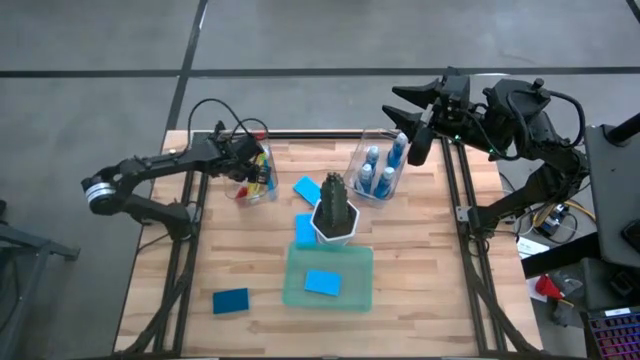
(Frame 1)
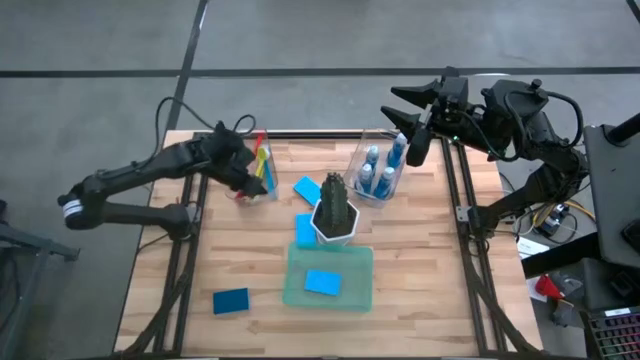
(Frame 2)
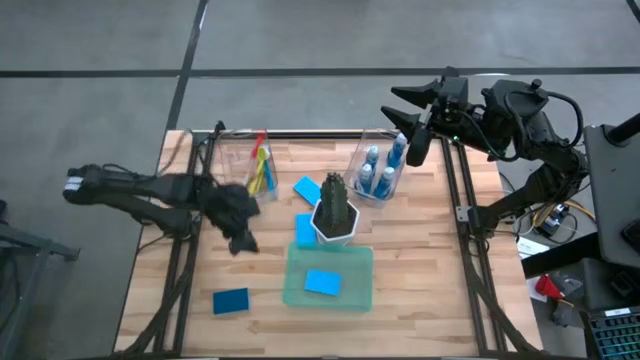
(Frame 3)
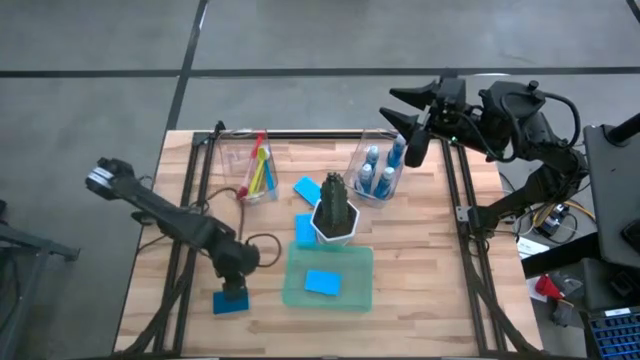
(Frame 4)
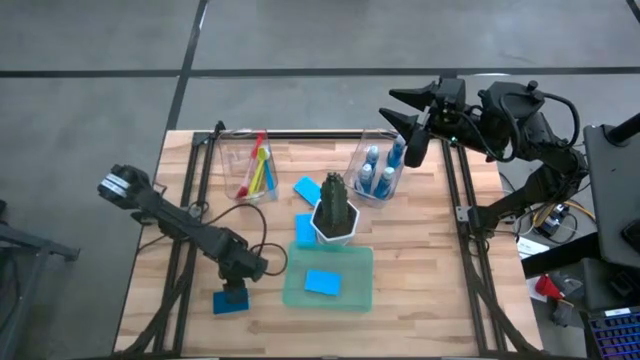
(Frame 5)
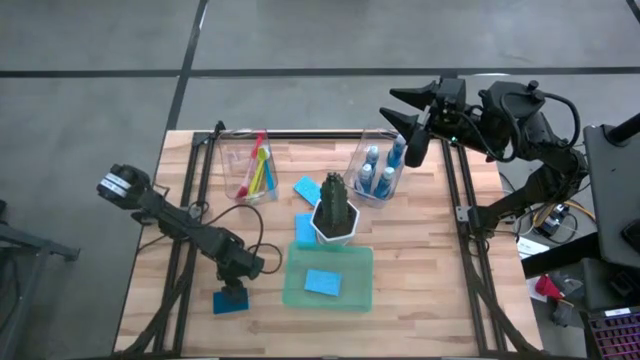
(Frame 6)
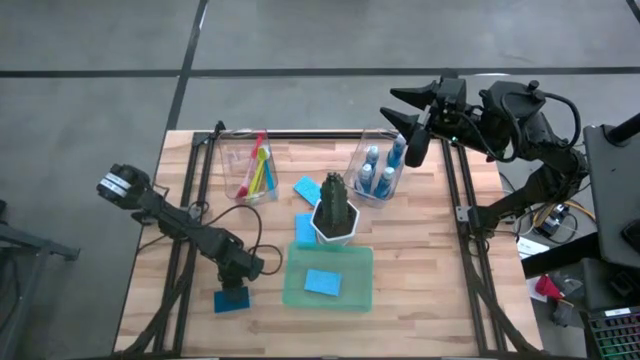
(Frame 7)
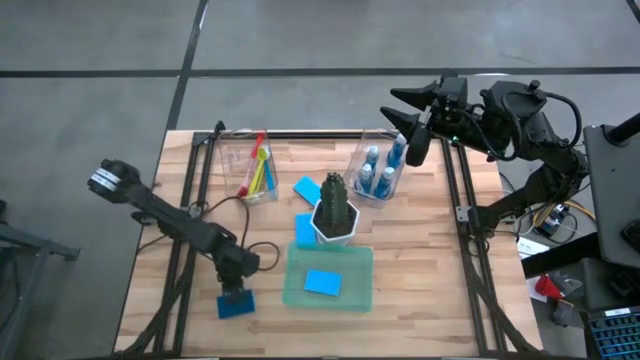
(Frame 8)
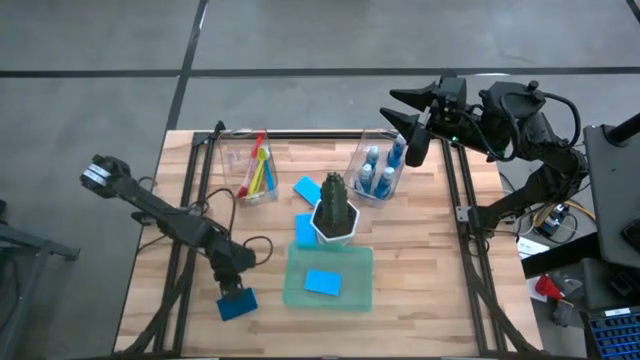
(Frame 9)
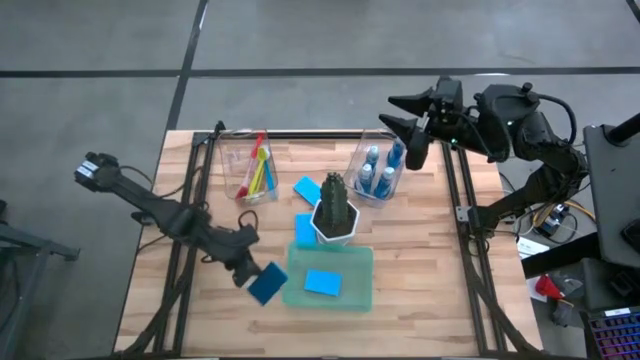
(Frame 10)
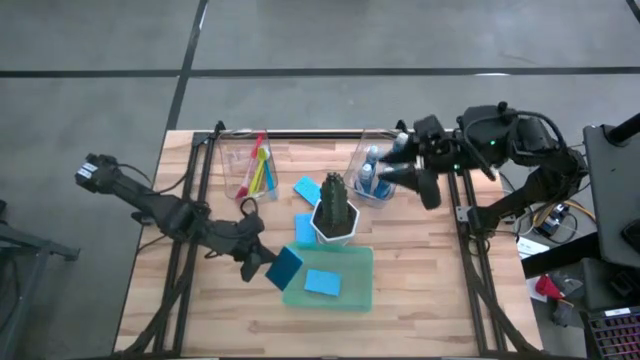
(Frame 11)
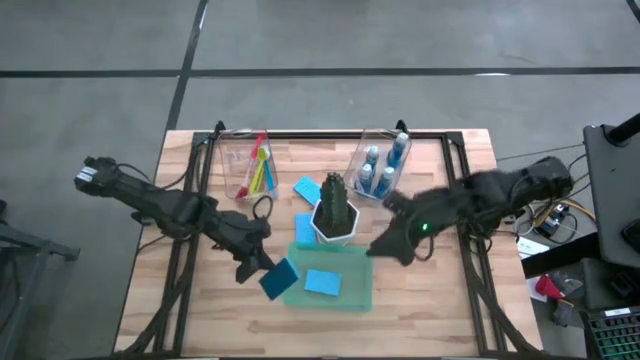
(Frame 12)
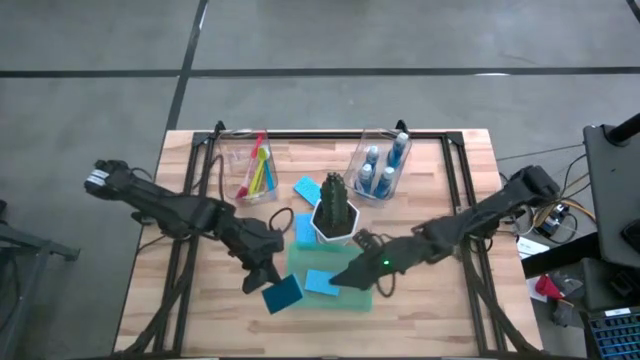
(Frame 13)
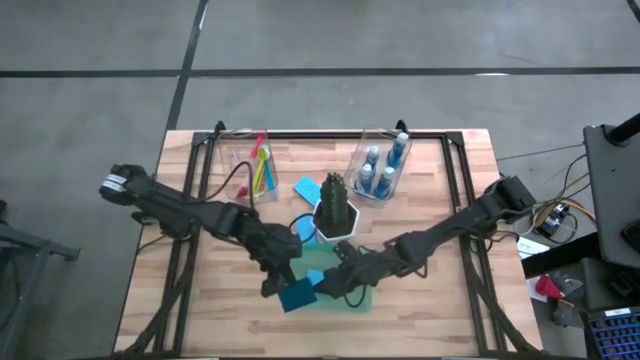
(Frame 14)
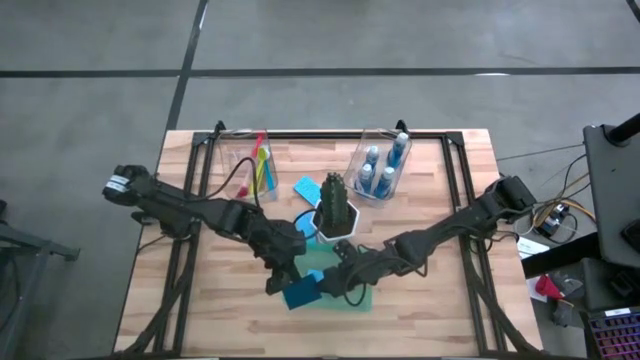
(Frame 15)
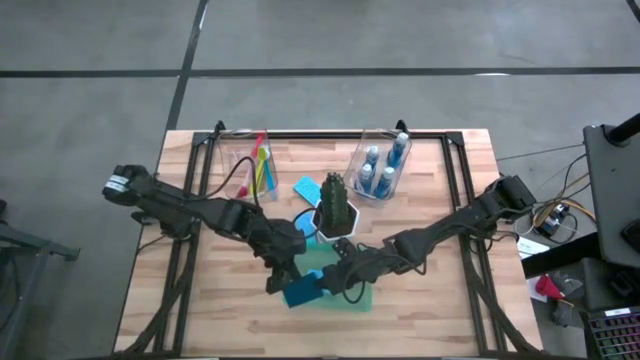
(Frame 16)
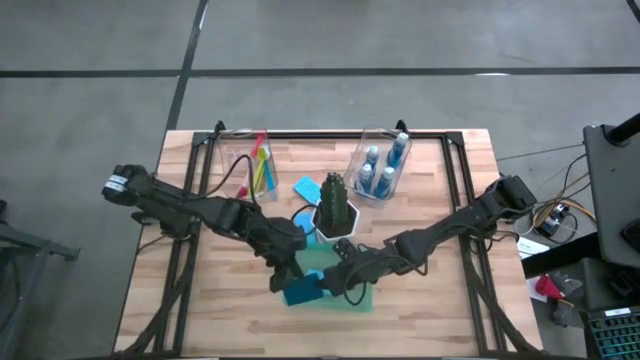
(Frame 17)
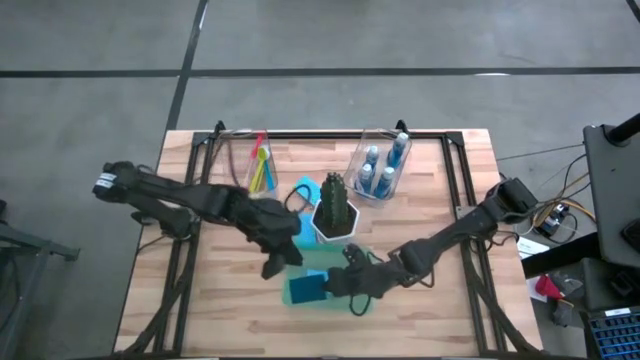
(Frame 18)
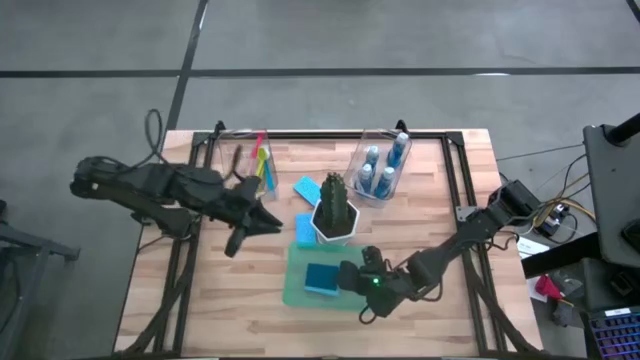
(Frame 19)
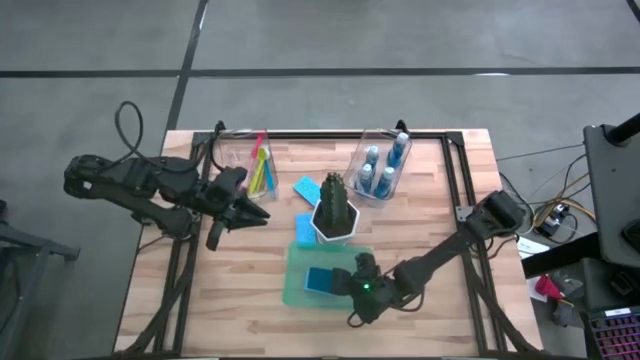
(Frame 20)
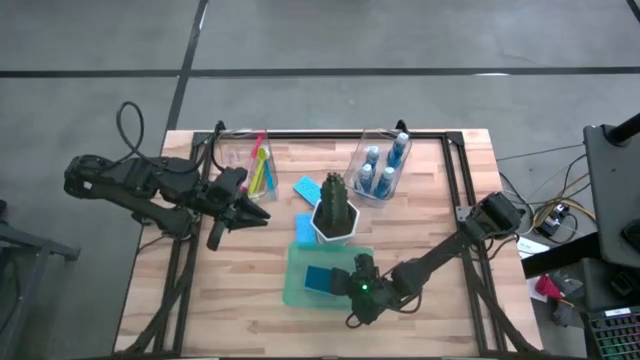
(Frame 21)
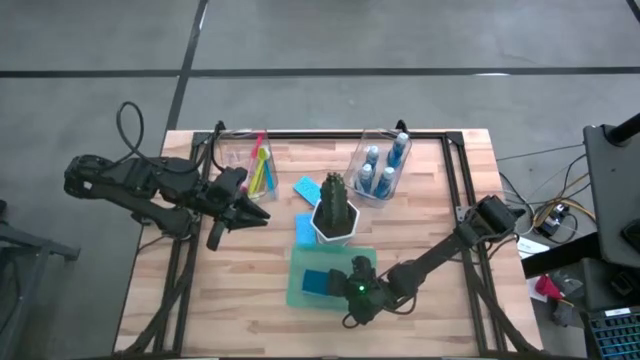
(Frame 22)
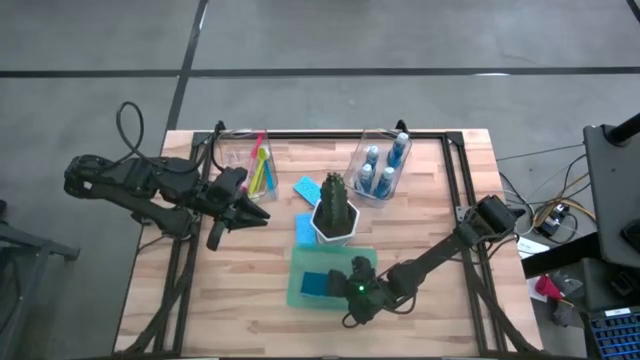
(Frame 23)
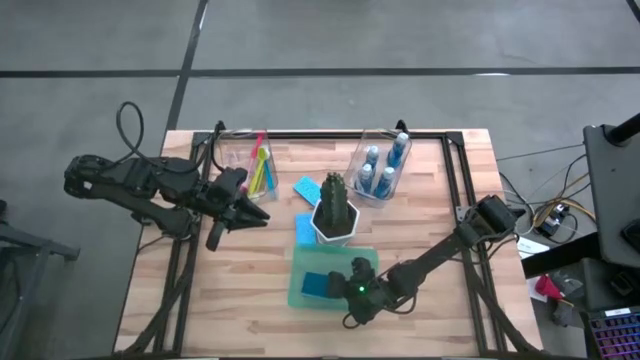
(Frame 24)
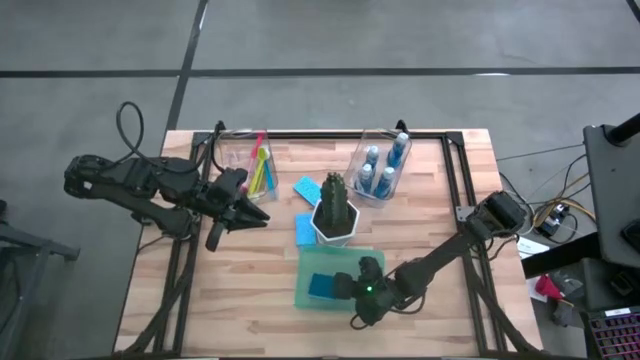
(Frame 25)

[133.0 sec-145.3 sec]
Task: Pick & Place Kitchen Sink Supplies
Stack the sponge on top of the sponge in the green bin

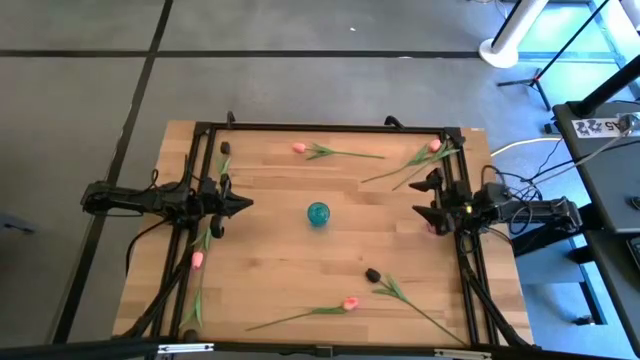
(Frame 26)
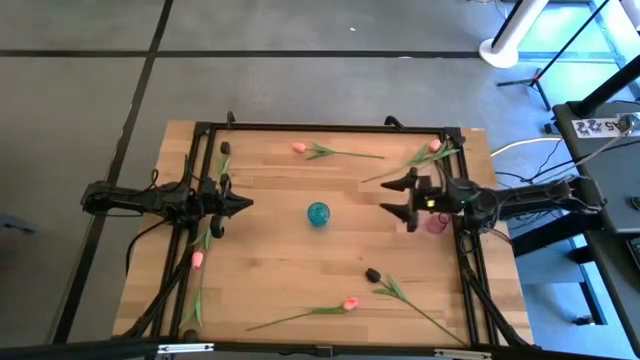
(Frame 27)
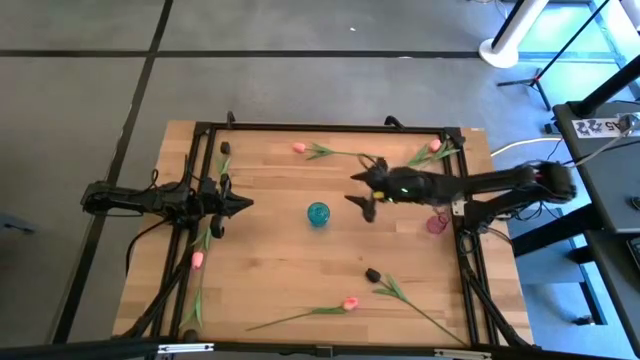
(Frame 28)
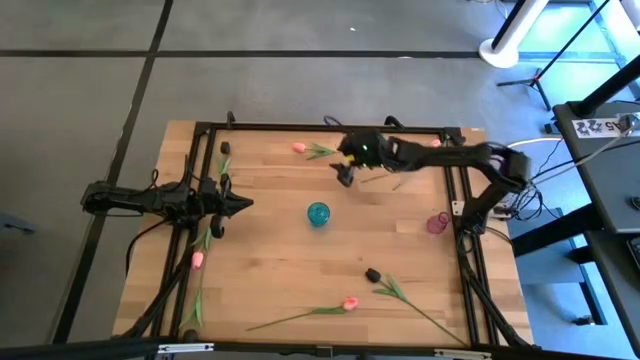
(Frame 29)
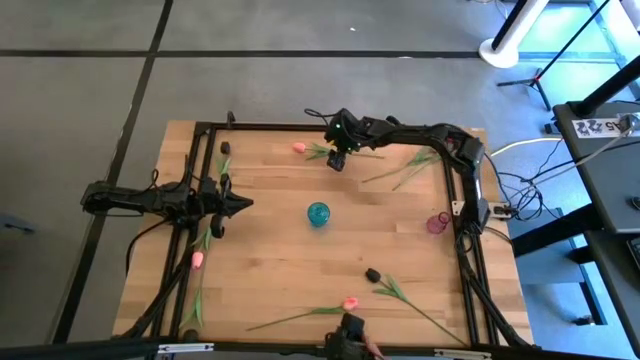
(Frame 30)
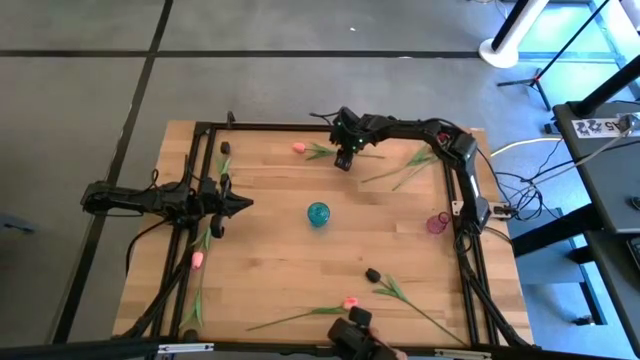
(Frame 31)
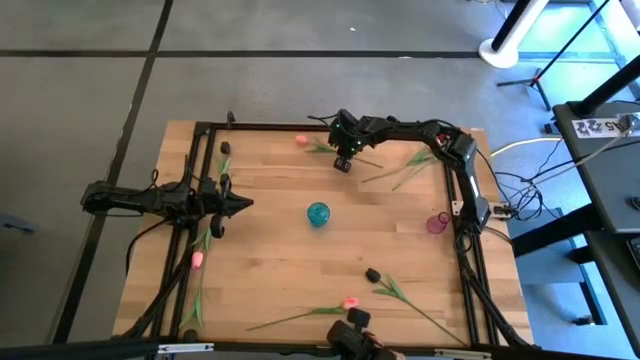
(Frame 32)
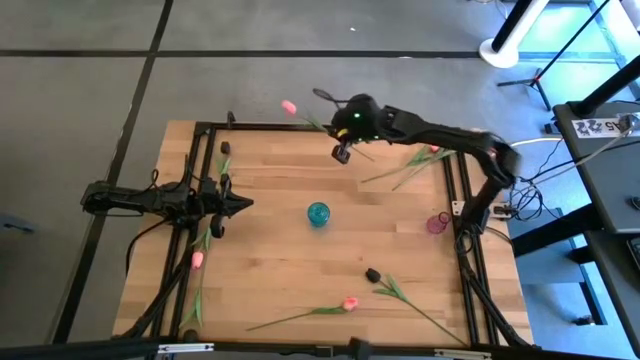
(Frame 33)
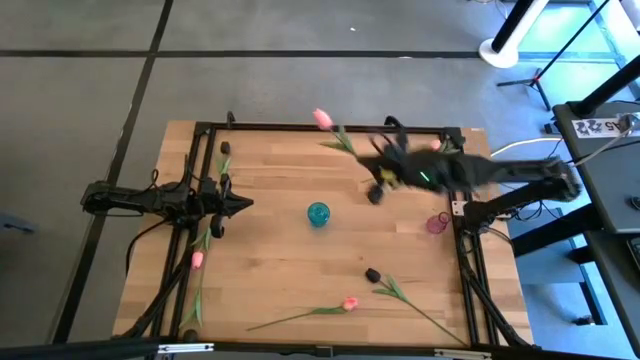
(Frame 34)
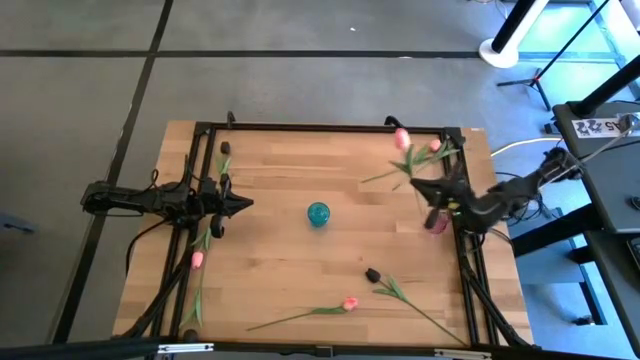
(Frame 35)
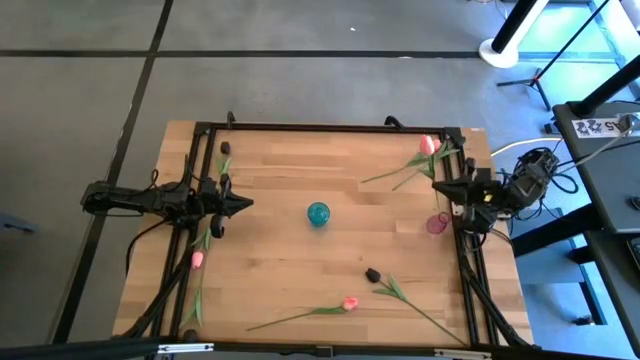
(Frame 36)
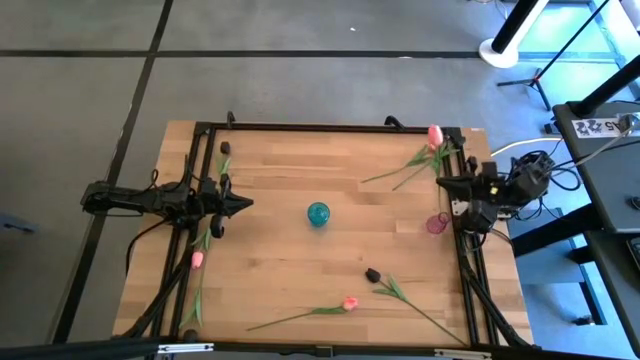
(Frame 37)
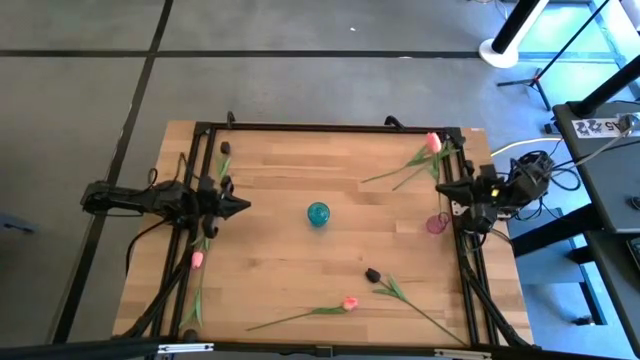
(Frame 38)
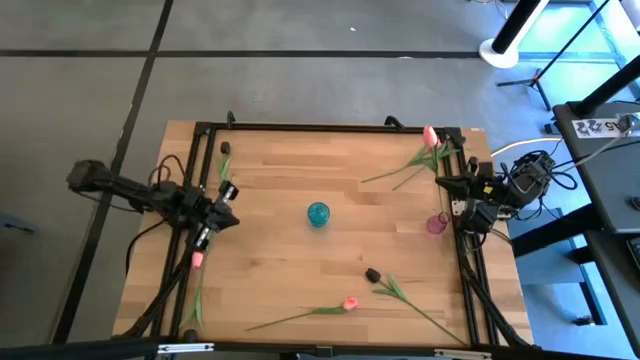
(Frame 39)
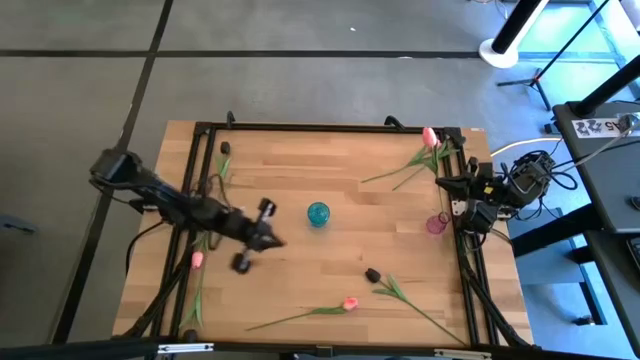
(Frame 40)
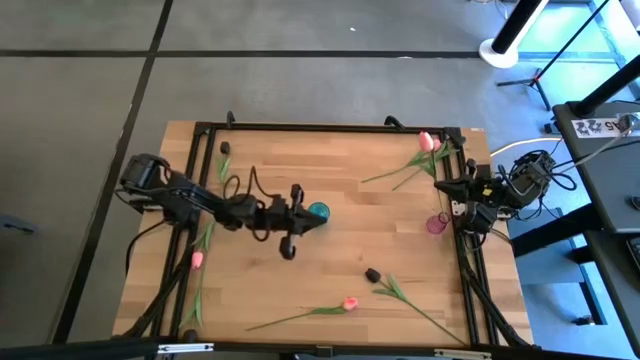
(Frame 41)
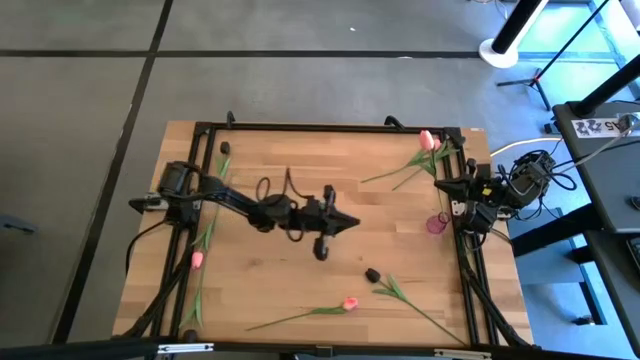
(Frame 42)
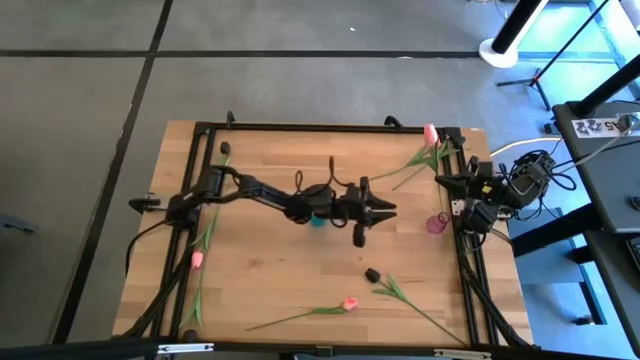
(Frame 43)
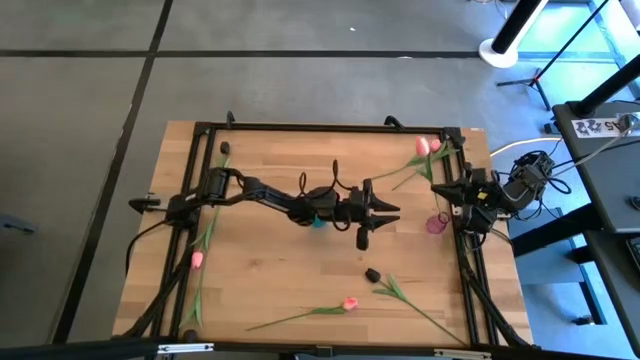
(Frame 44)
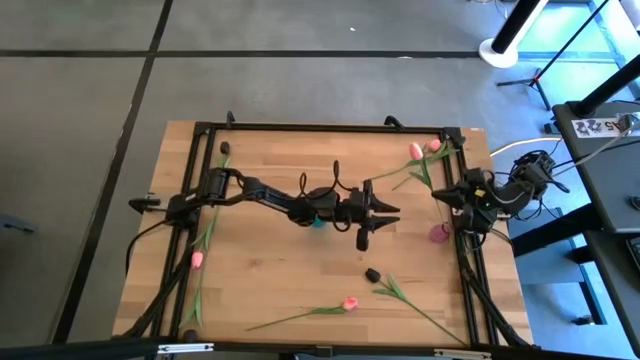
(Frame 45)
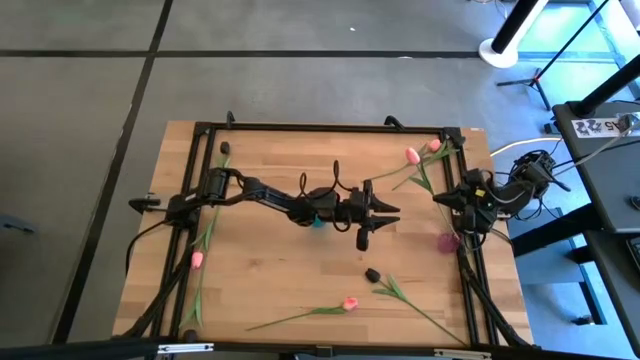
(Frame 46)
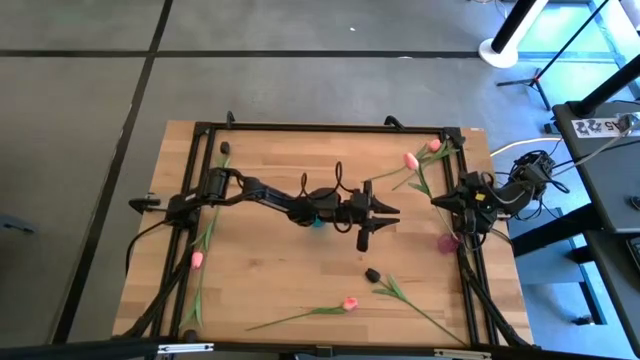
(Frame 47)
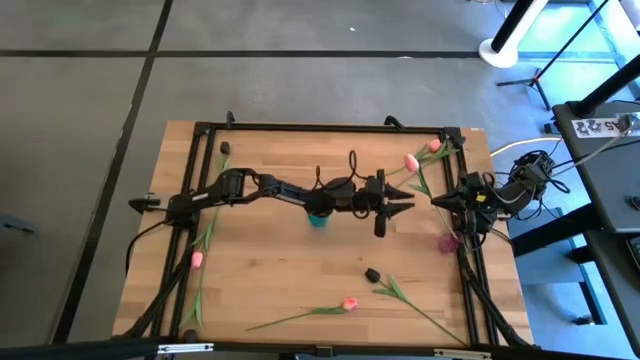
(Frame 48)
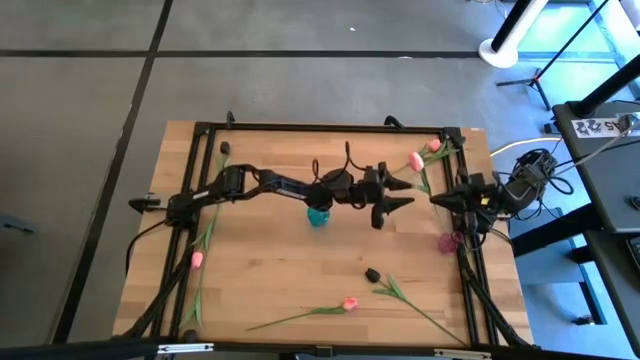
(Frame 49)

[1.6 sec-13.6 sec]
Task: Sort flowers into vase by color
Put the pink tulip into the purple vase
